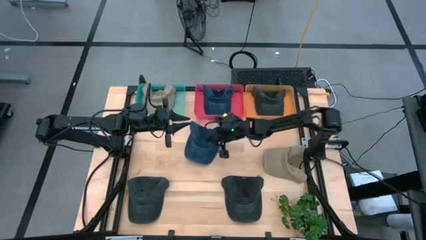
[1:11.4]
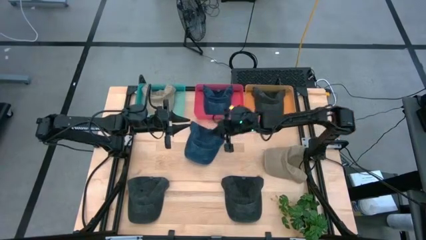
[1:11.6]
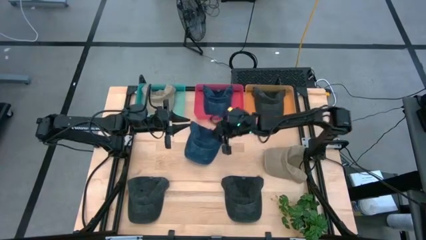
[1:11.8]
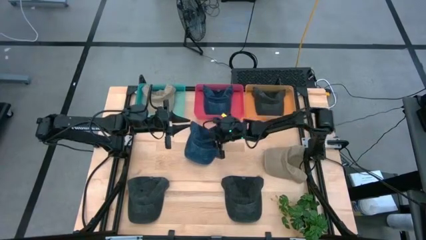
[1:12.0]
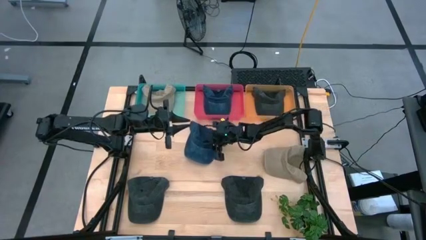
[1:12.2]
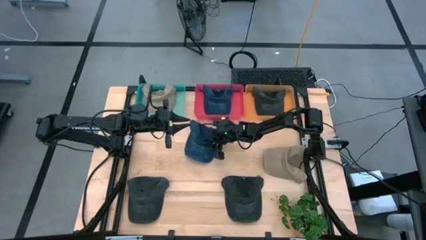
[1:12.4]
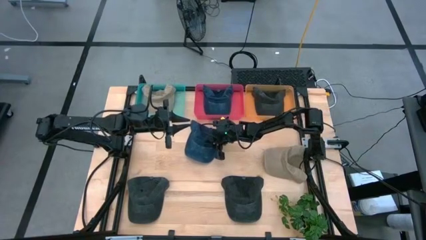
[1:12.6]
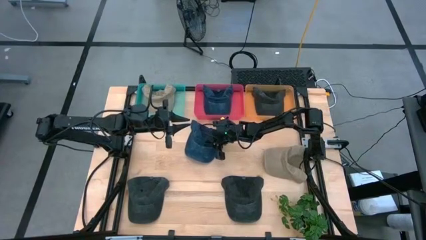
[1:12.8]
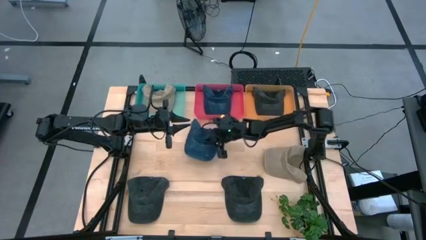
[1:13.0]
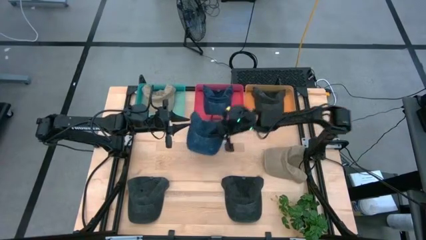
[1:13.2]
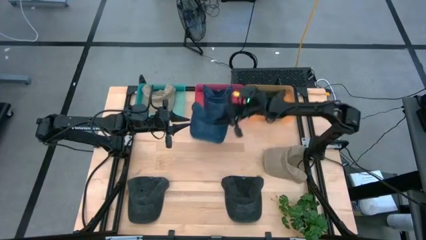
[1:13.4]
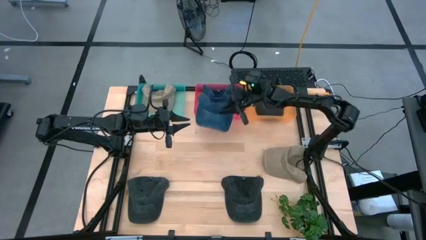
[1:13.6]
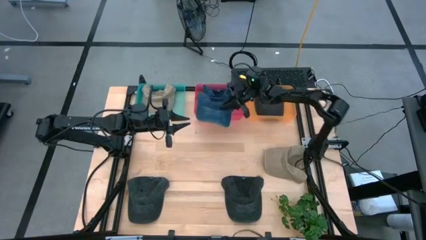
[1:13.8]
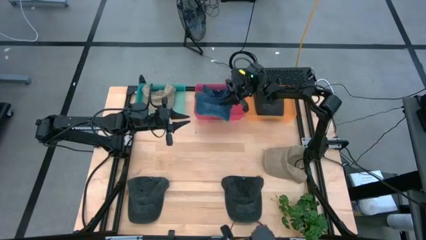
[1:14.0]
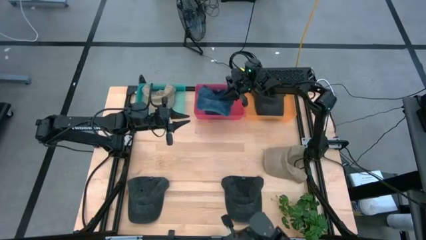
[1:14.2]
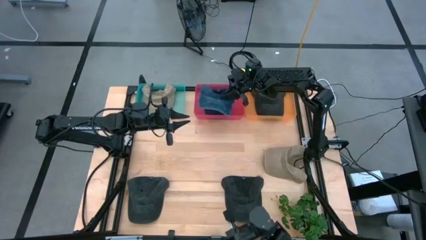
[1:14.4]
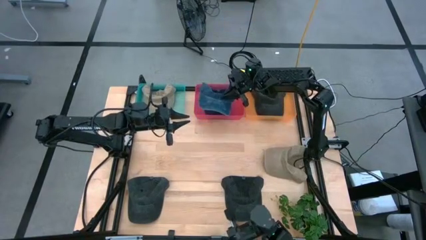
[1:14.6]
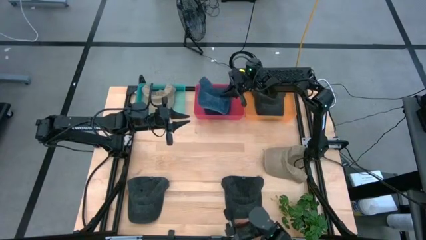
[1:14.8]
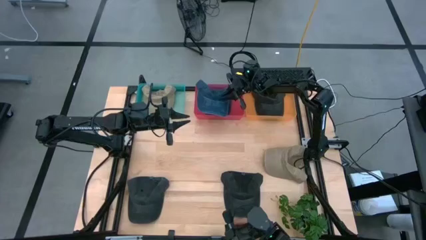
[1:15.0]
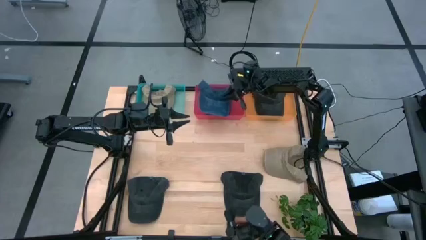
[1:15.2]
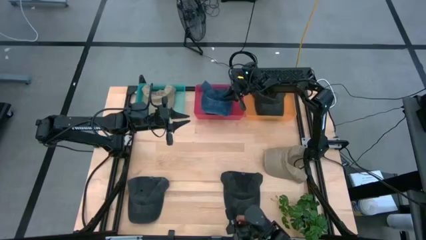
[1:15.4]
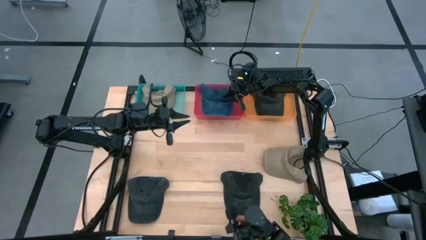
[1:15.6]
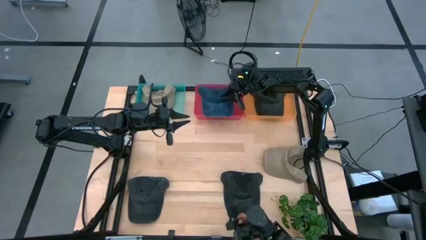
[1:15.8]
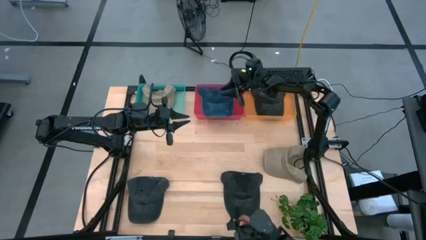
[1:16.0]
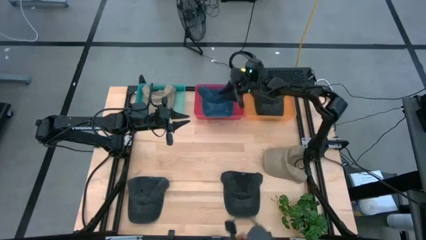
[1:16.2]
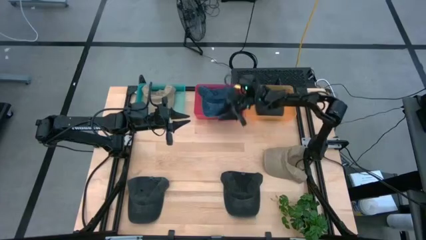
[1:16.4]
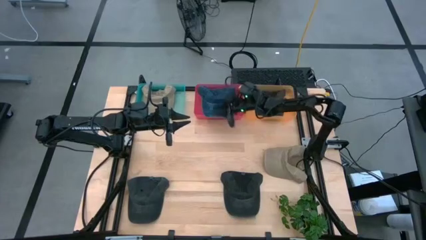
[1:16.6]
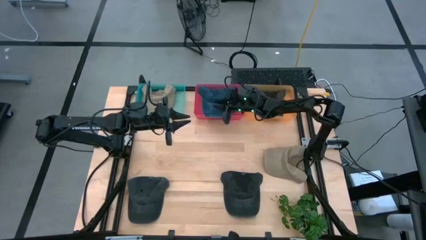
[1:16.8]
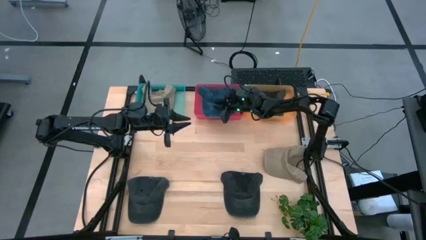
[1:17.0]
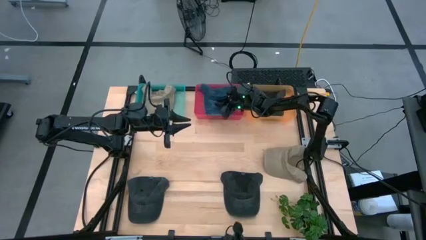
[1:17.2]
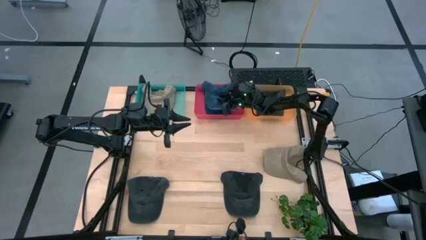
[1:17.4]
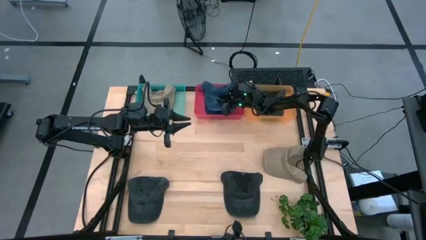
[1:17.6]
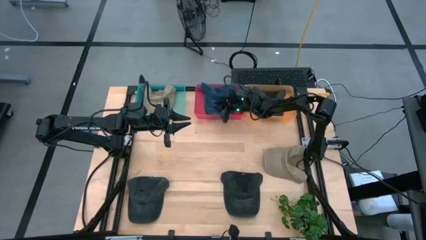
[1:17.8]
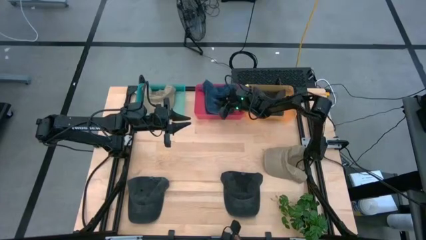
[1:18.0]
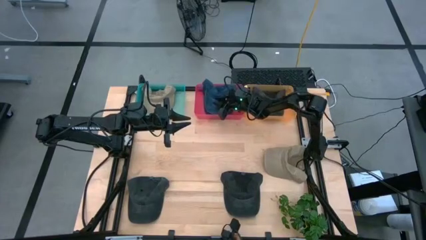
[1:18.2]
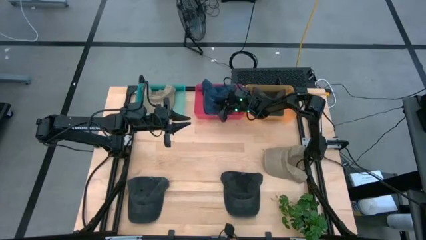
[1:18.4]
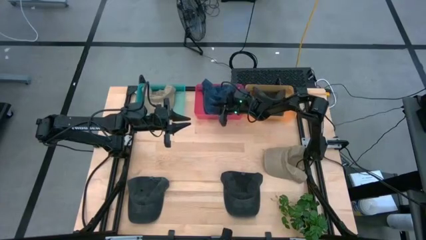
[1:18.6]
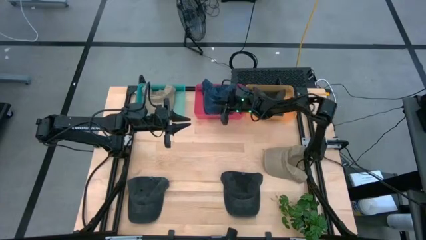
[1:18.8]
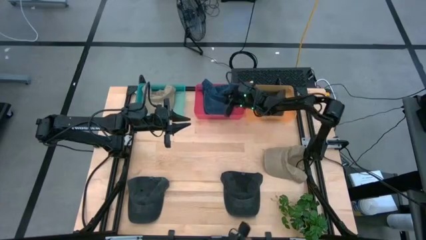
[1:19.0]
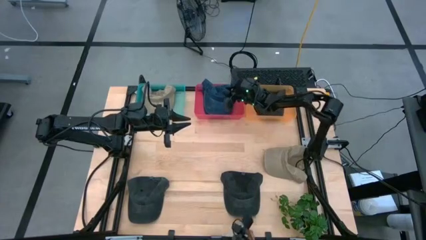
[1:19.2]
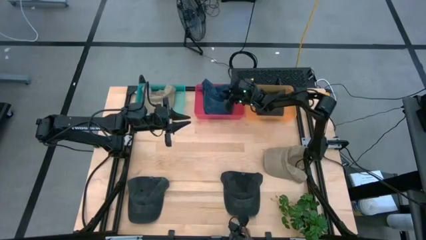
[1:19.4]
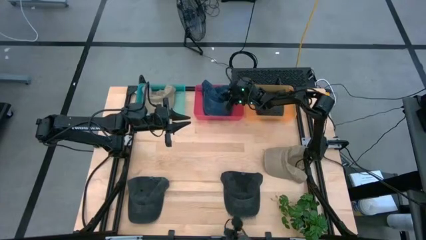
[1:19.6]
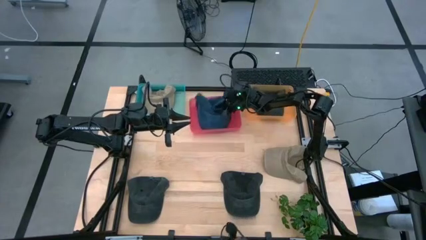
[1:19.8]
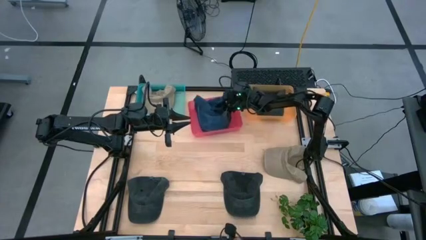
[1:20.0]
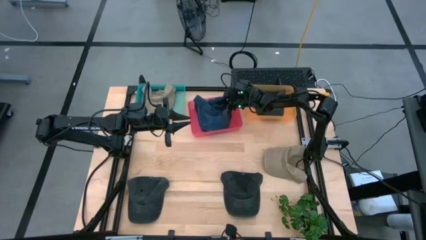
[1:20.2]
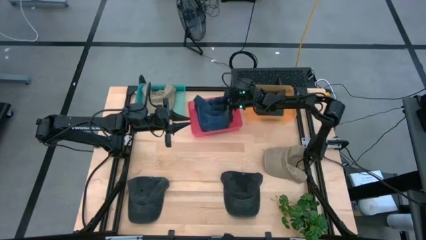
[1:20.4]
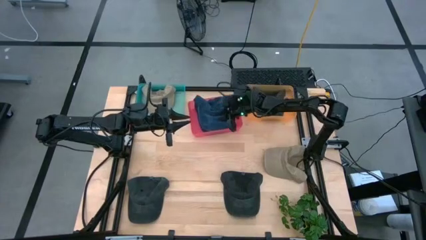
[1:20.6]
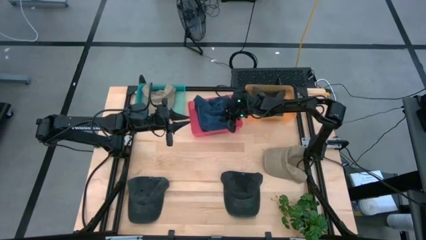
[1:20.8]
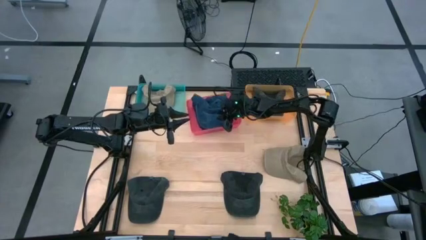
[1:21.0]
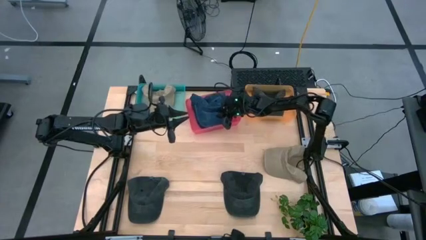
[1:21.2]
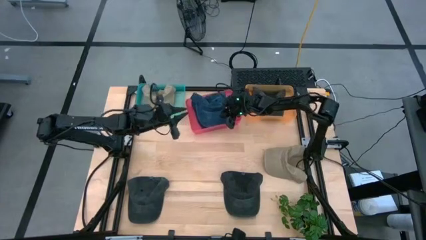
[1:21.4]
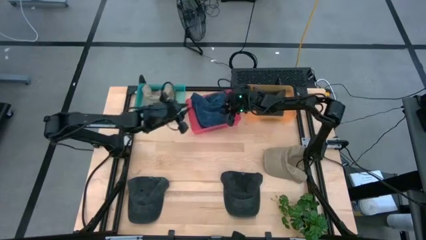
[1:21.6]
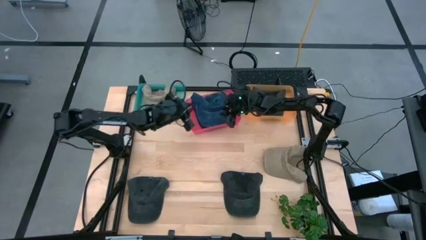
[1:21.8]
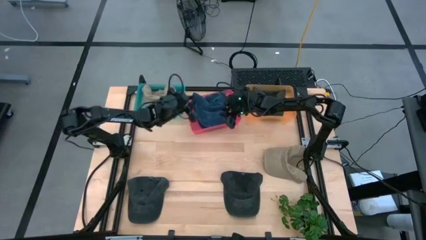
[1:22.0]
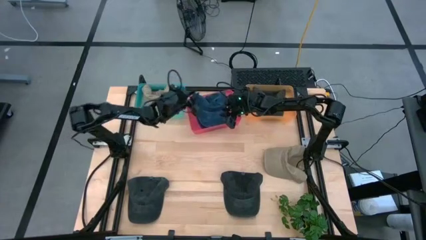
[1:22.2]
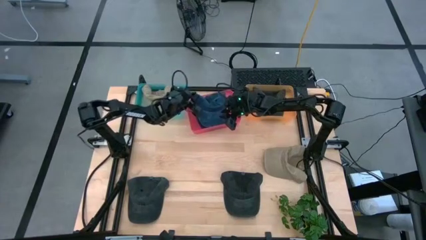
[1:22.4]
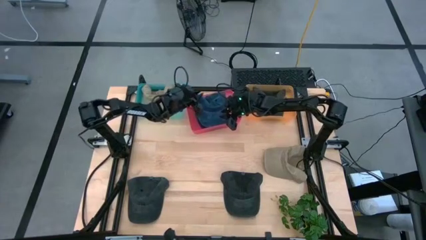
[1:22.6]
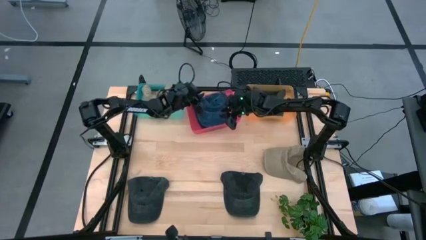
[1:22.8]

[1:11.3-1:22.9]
Task: Pick & Place hat
Put the blue cap into the red bin

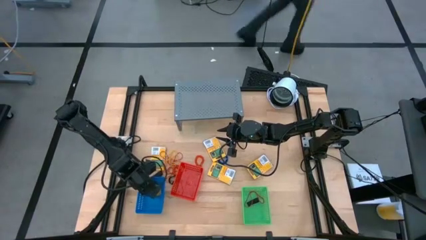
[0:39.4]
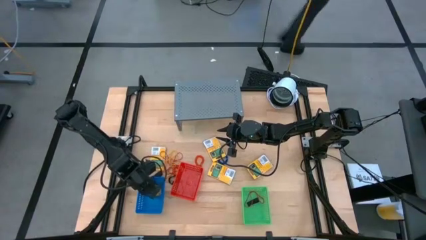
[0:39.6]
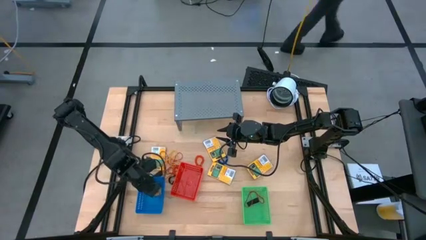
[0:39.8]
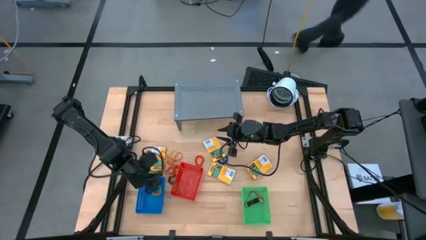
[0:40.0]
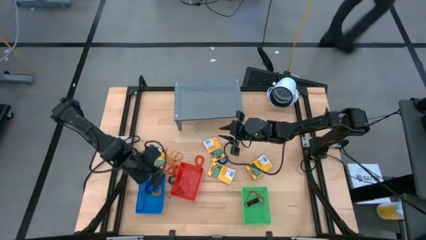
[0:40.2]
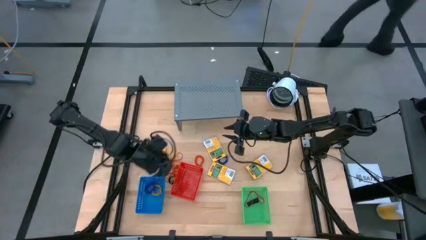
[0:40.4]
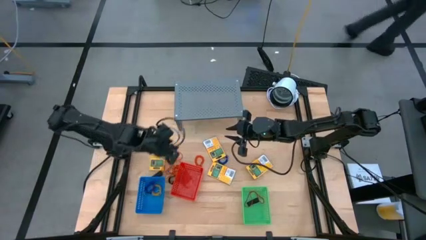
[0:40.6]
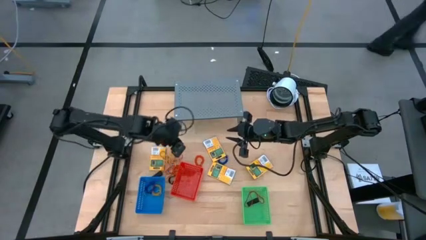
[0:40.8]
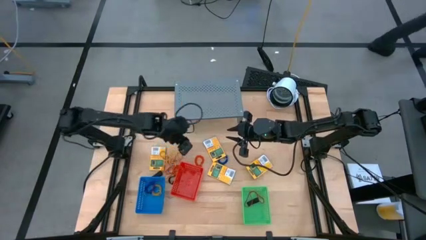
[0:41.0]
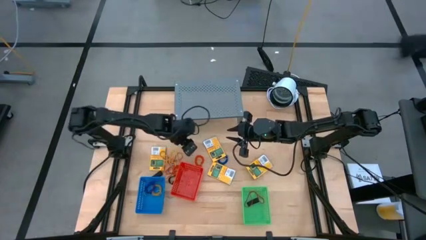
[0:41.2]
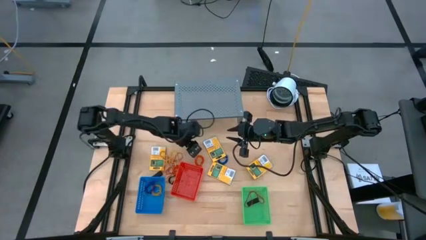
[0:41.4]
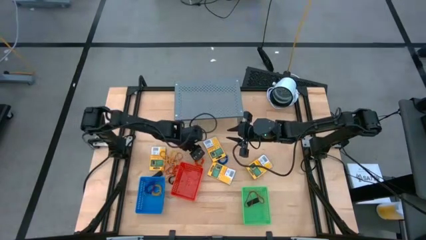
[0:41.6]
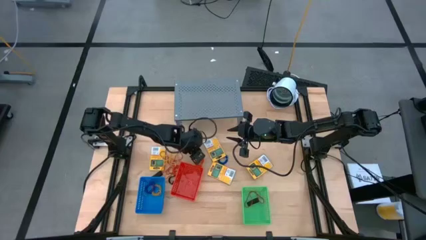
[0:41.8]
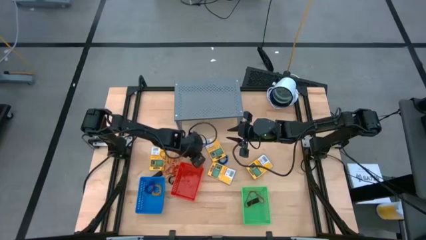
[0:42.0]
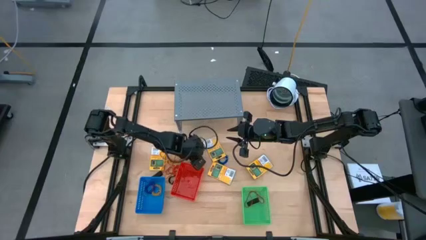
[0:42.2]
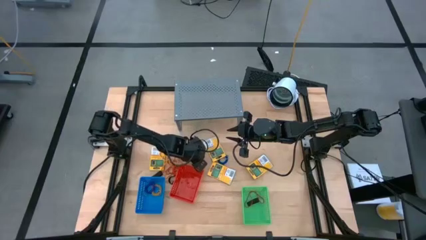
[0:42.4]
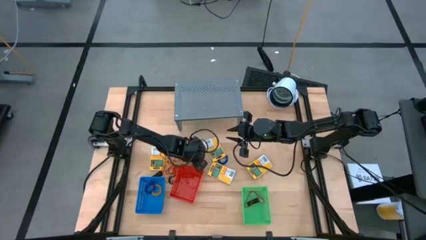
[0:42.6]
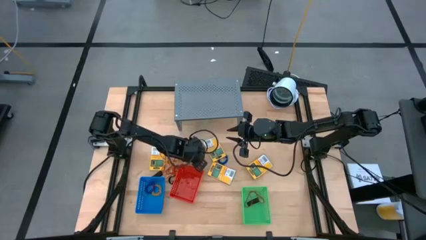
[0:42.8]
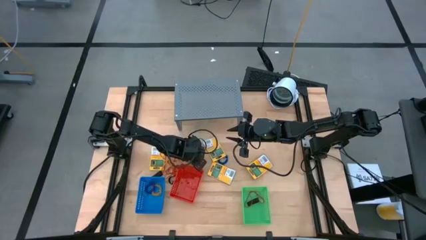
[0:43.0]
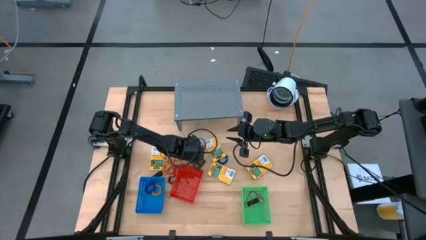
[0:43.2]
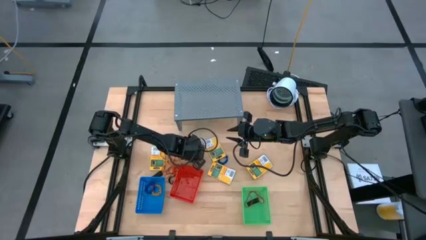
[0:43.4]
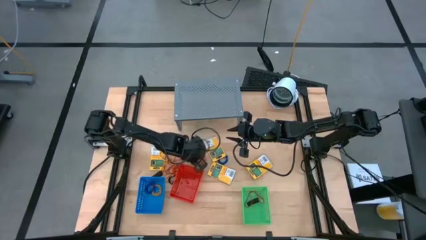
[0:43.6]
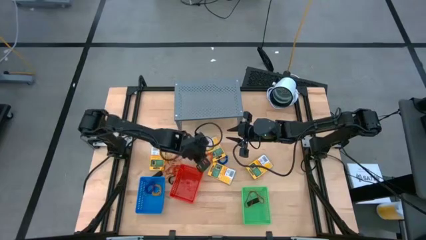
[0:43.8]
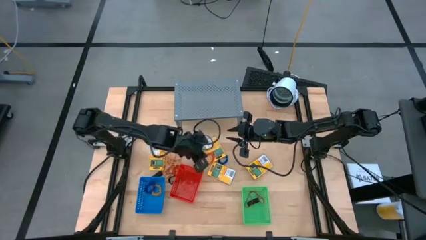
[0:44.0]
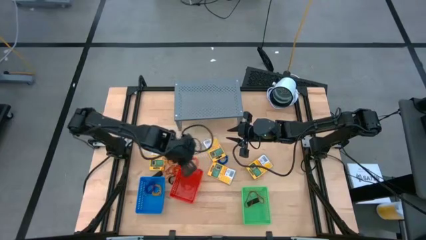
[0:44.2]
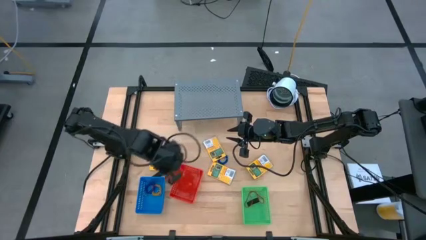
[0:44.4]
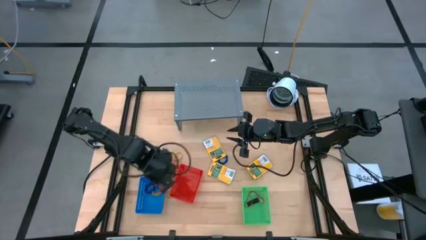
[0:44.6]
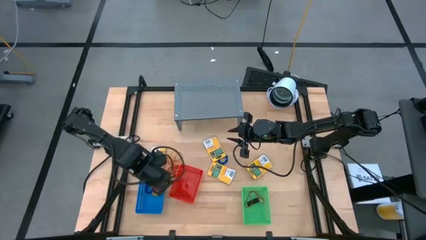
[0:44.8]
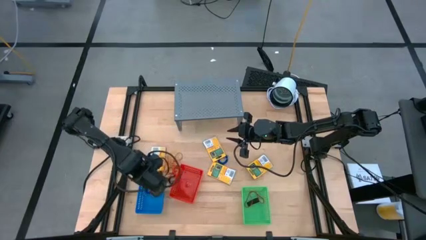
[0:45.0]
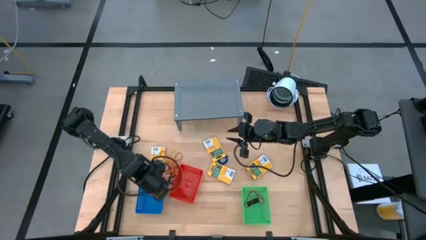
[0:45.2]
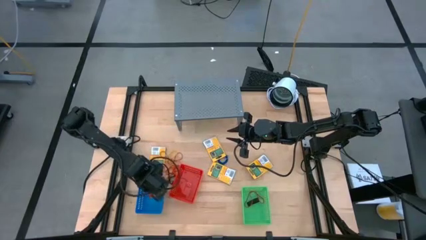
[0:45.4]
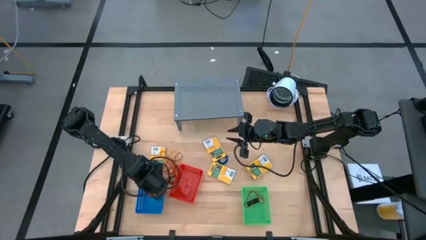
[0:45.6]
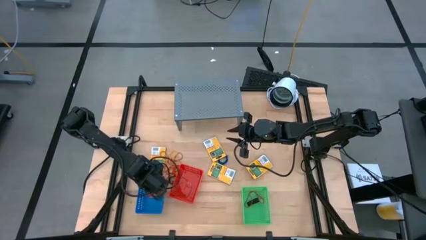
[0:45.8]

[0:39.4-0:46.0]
Task: Pick & Place Office Desk Supplies
Put the top orange spring keychain into the blue basket
